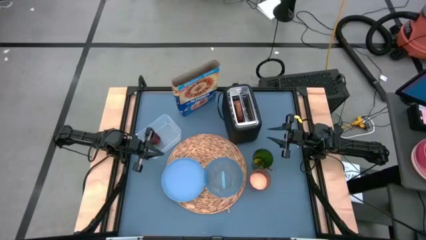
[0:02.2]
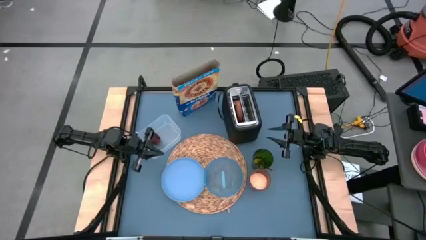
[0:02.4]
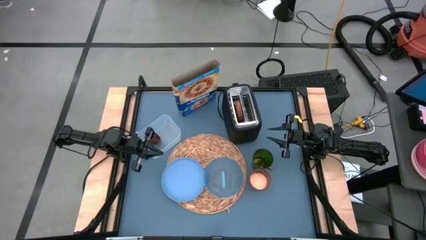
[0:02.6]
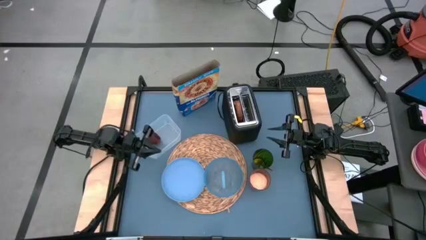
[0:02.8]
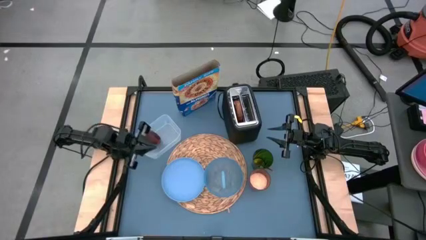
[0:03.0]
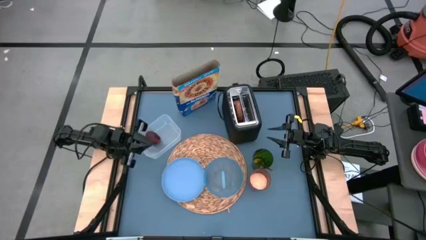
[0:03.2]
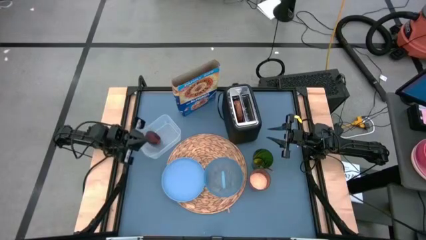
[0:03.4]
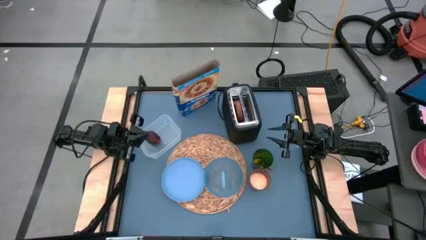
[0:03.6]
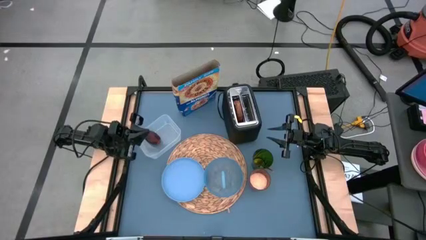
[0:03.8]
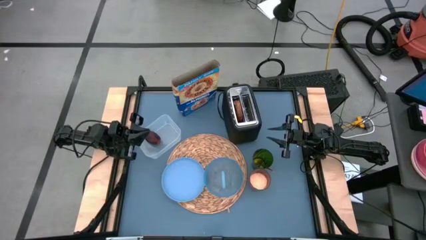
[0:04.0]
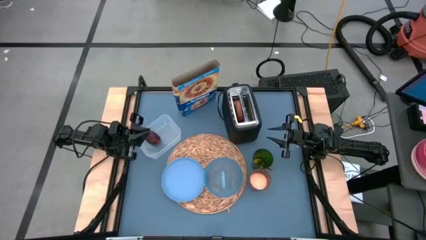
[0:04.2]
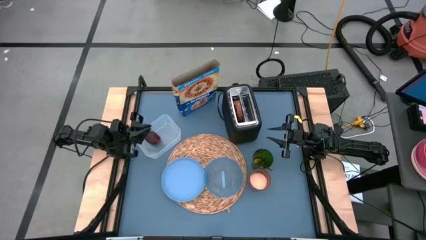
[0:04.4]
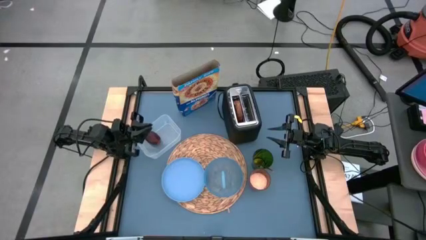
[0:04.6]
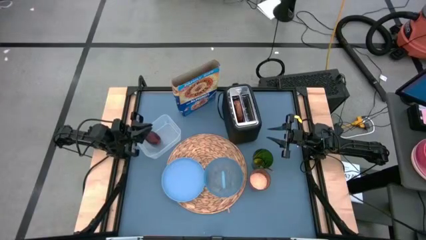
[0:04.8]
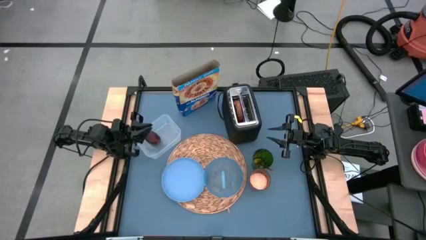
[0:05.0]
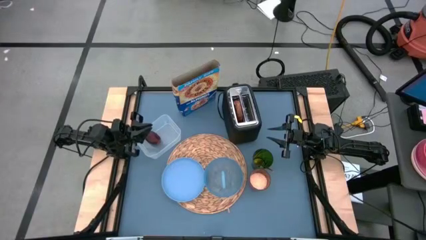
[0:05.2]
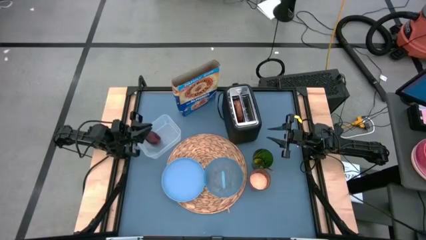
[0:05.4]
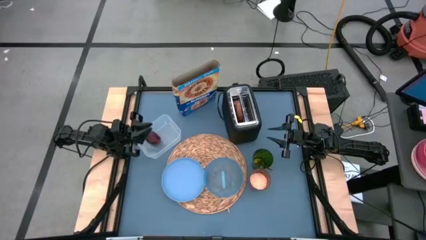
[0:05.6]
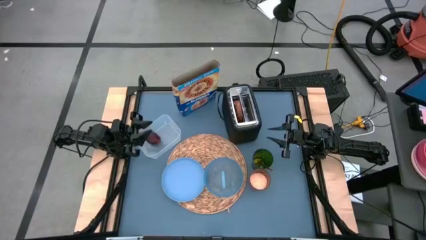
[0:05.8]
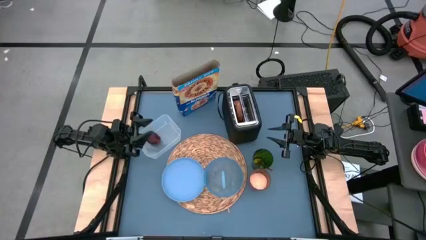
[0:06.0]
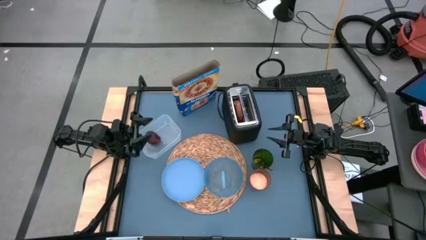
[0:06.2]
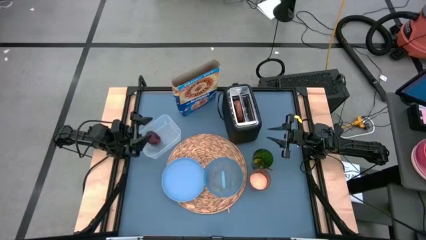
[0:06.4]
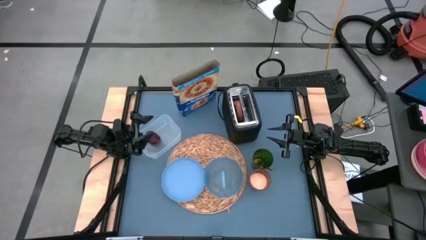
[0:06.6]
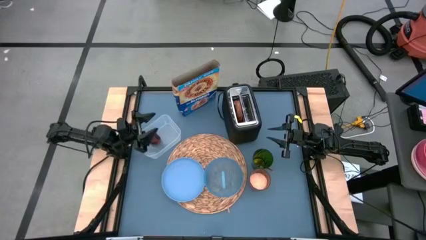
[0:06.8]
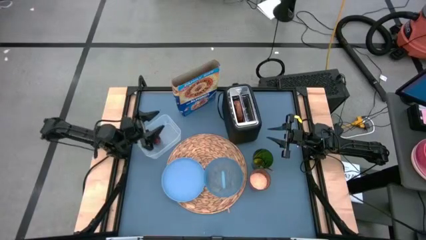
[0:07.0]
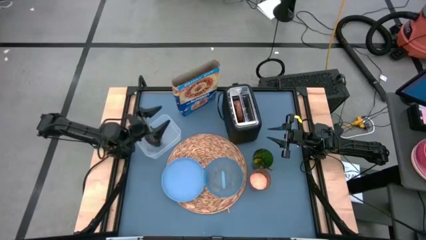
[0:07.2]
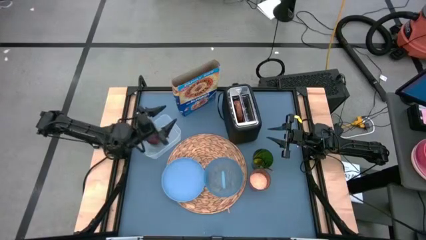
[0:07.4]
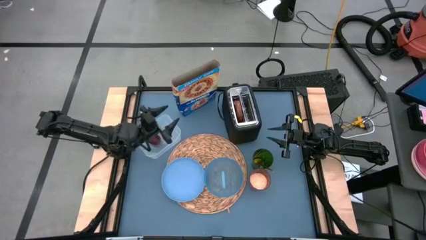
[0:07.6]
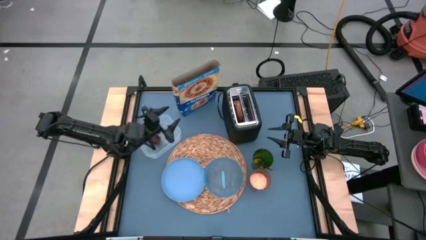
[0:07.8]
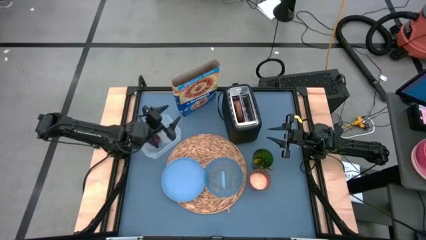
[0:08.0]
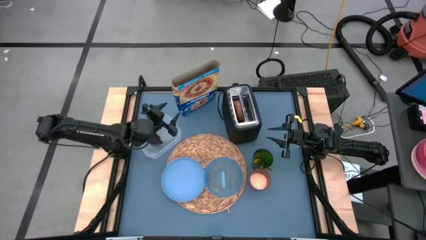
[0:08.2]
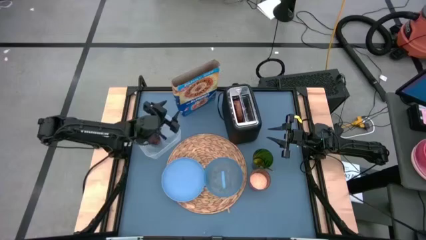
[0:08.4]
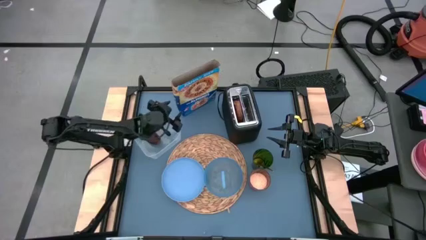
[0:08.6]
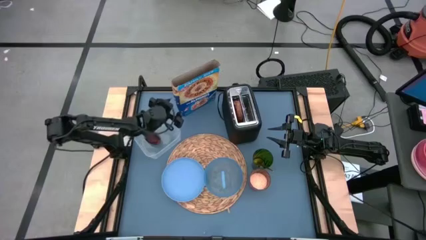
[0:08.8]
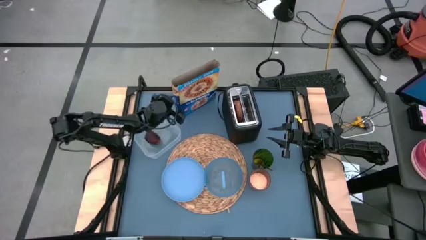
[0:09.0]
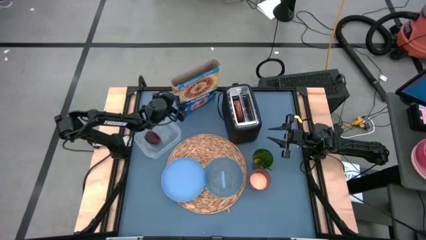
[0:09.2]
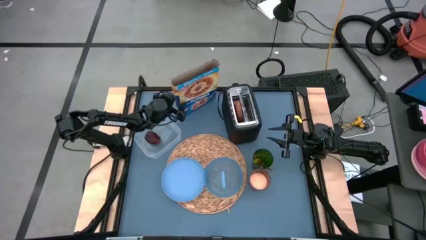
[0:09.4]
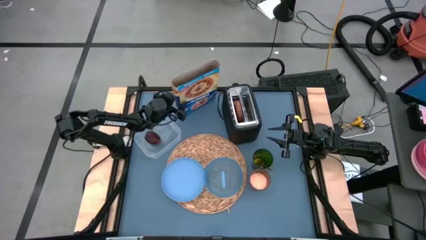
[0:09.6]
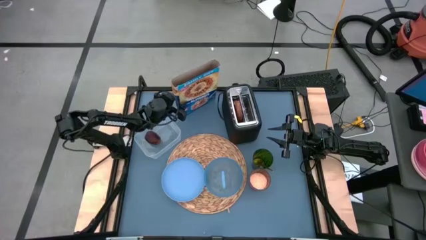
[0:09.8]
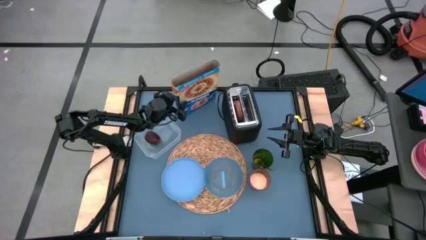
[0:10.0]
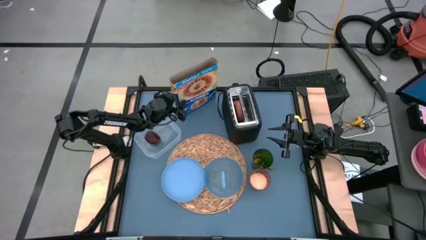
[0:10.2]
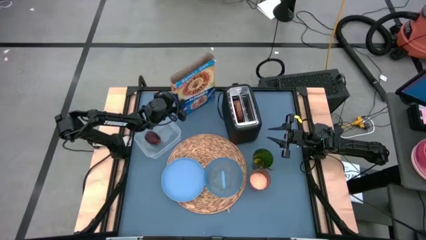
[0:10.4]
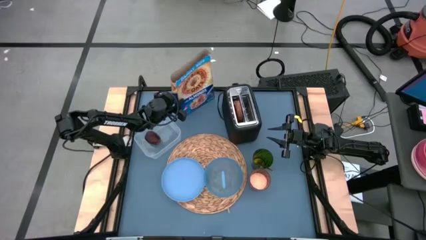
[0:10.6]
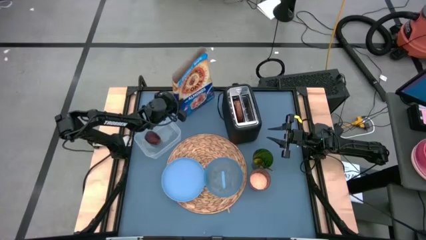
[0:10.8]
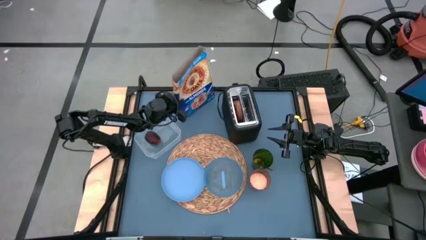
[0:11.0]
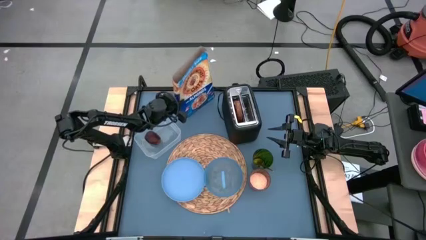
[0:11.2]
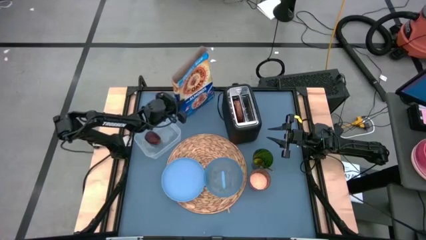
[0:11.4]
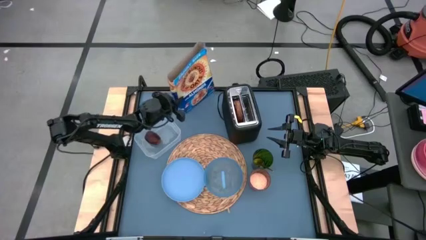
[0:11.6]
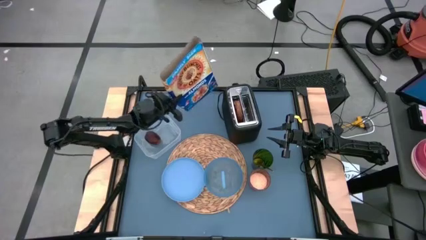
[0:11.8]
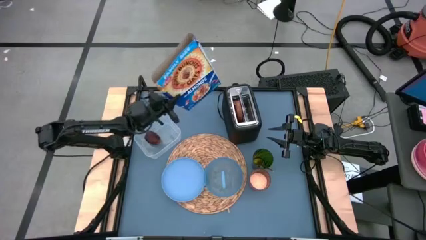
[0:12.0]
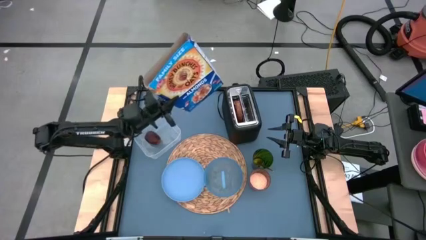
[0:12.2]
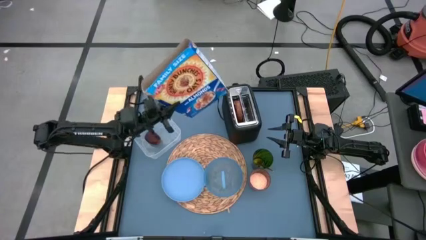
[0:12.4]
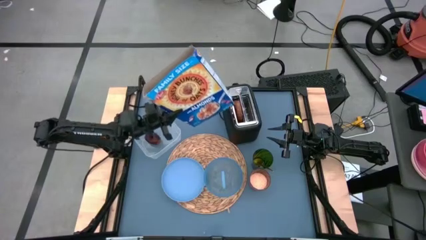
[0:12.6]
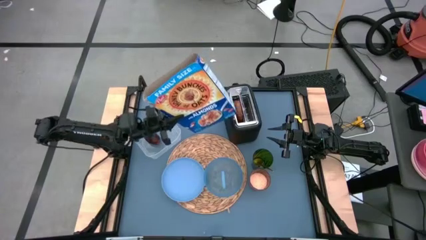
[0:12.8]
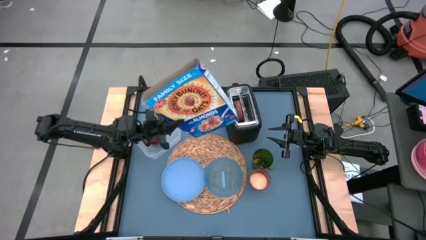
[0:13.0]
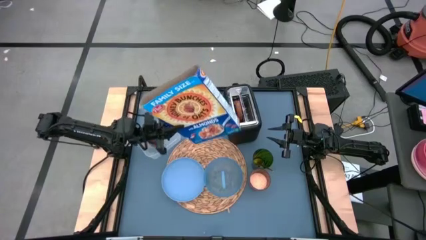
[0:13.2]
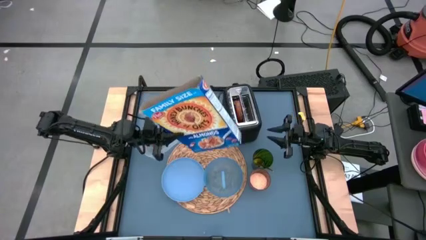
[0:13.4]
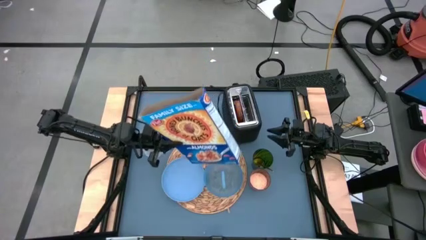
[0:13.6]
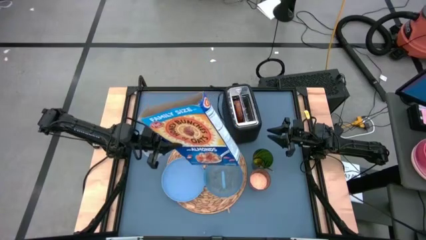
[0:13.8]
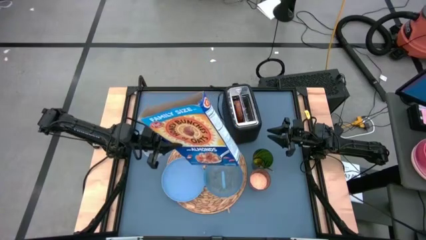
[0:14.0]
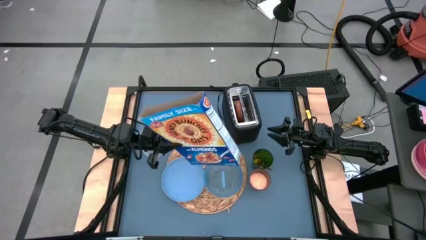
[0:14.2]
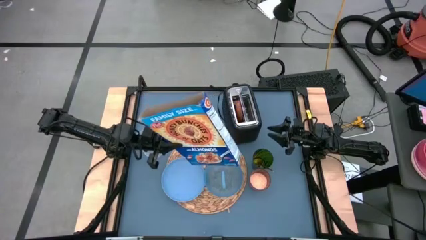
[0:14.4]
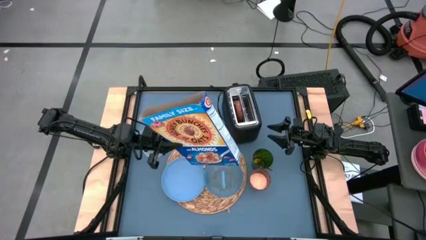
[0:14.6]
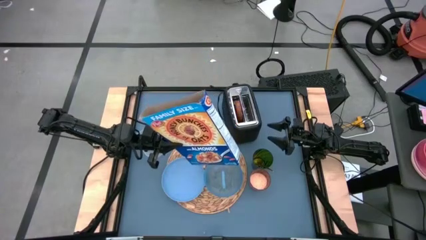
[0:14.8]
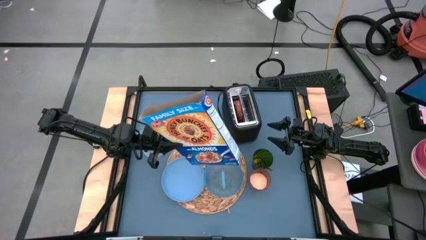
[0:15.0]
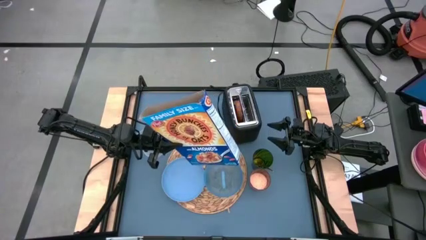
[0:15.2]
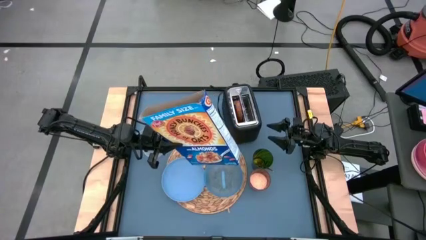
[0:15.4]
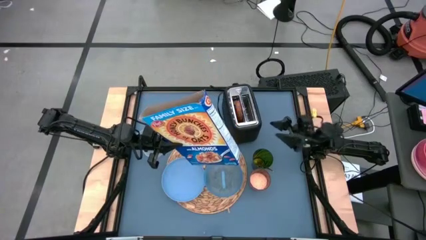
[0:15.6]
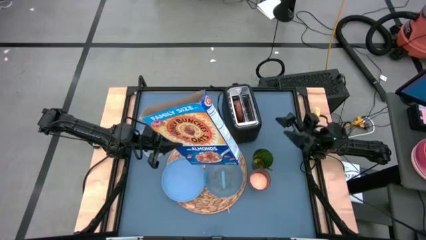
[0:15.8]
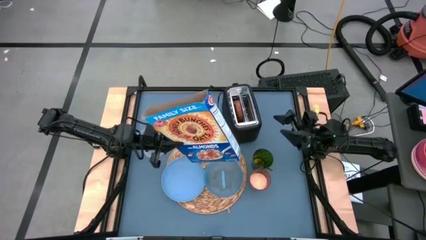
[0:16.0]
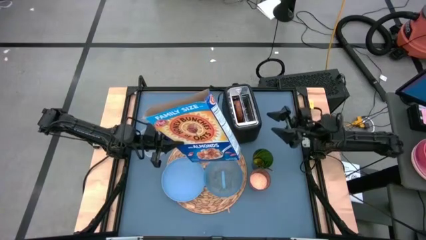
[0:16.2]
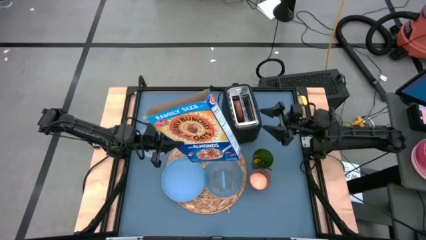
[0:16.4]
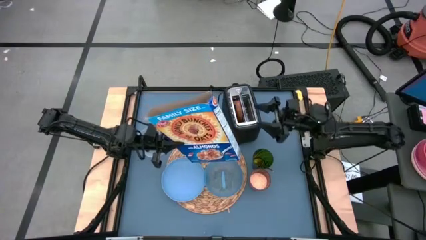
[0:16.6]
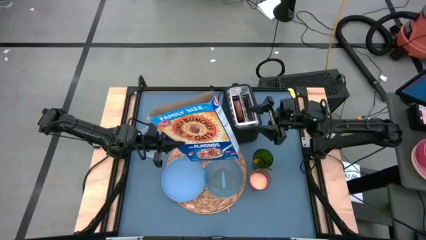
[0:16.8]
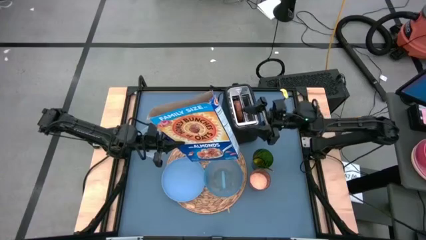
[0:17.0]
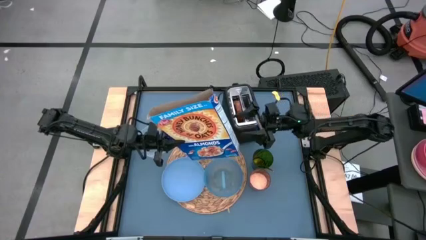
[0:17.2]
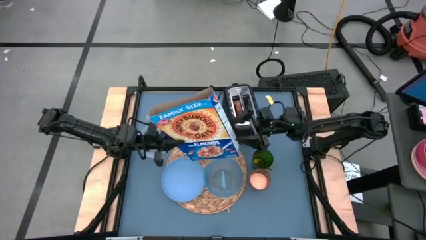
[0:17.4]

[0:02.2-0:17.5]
Task: Arrange a breakfast setting
Pour the cereal from the cereal box into the blue bowl on the table mat
